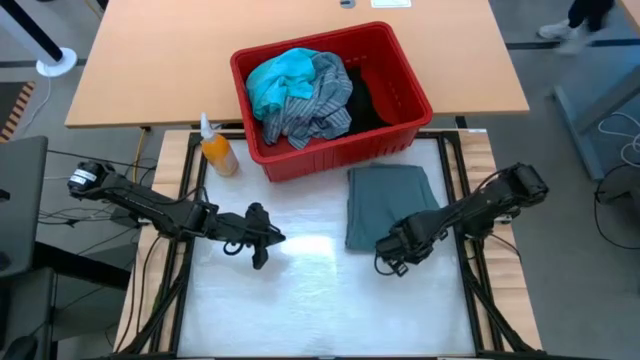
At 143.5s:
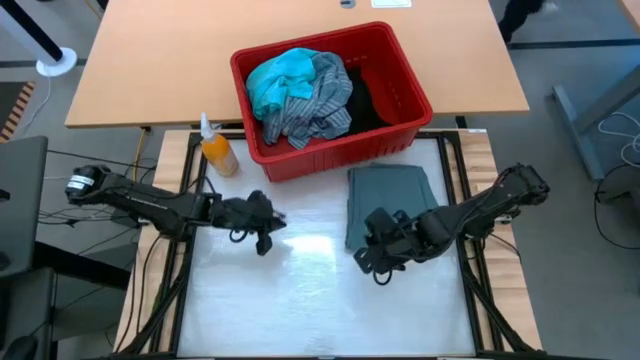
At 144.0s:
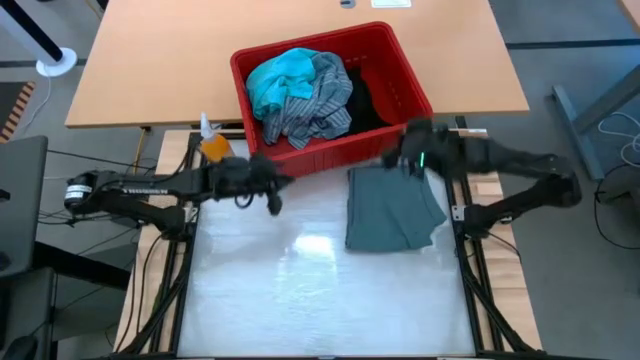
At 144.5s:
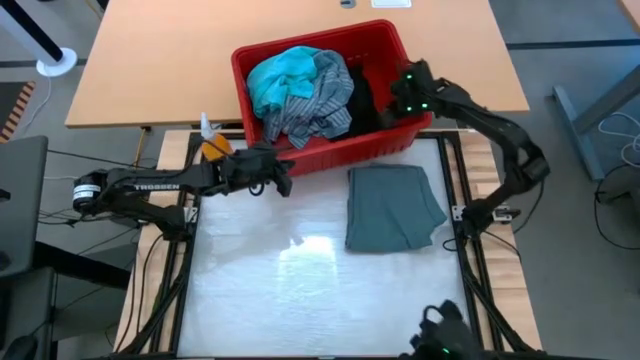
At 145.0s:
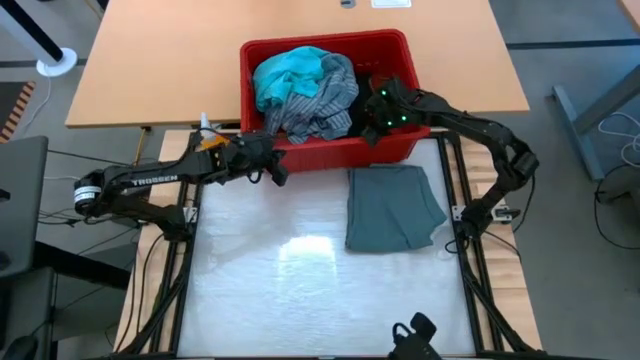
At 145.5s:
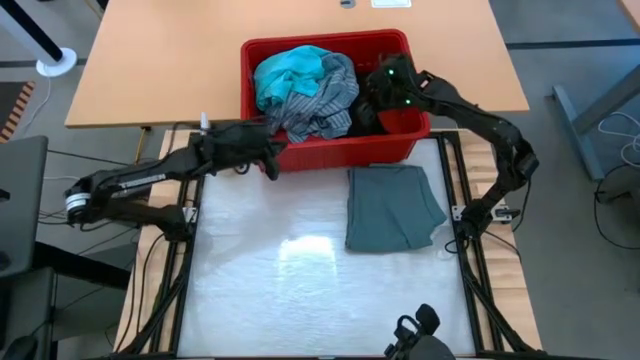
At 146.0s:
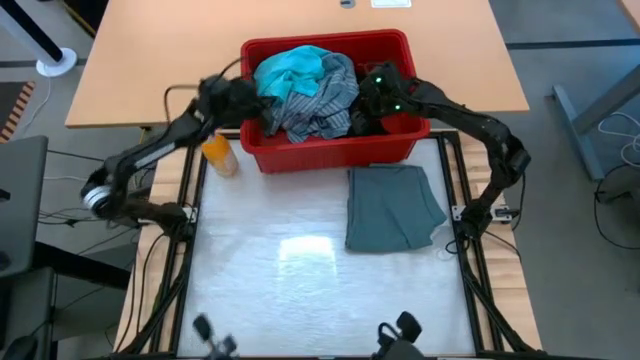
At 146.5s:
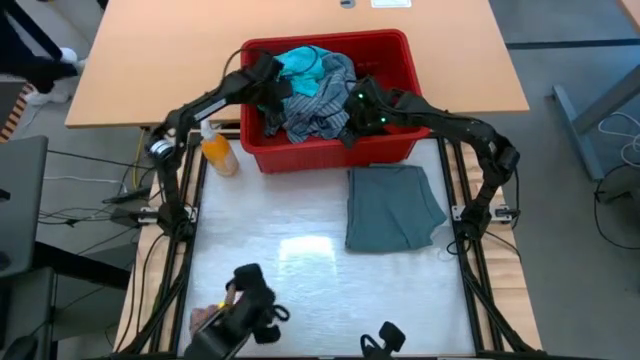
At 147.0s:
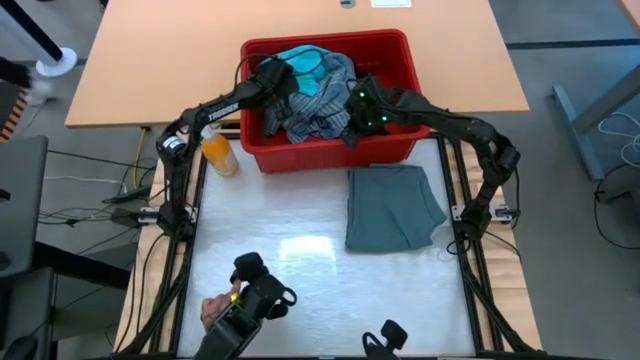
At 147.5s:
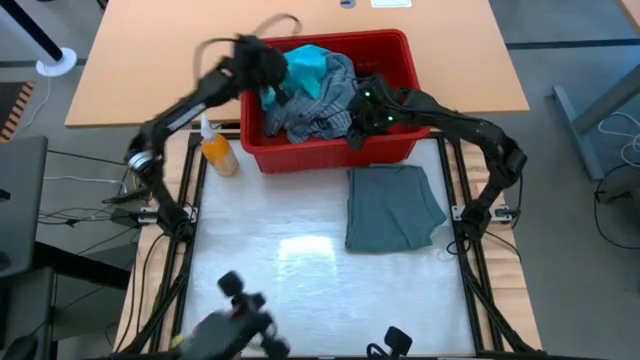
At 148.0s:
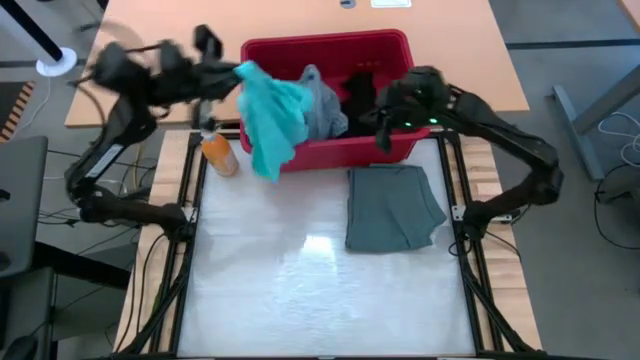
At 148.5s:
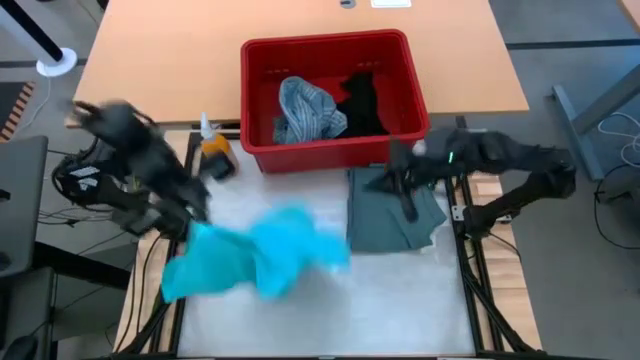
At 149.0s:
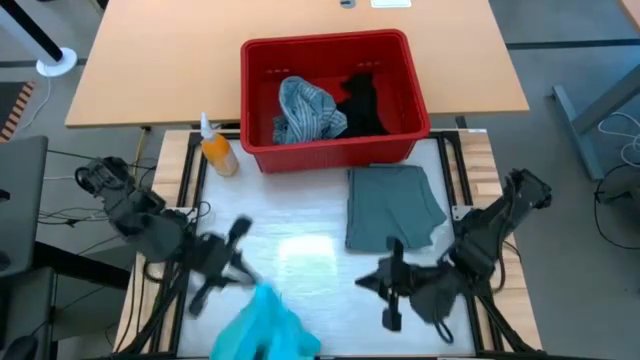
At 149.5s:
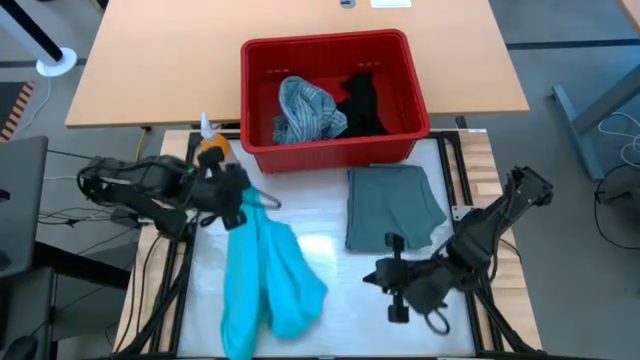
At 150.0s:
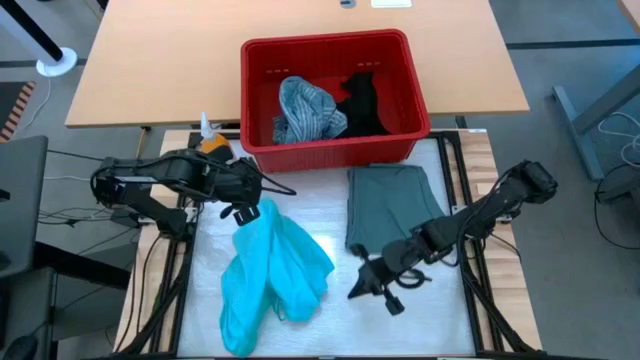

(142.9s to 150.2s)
Task: Fold Laundry from Bin
Remove the light blue shorts from the red bin

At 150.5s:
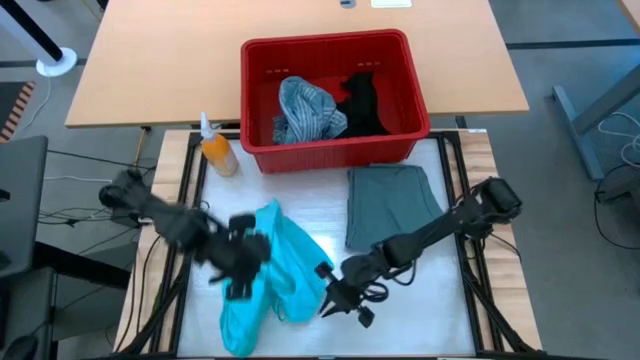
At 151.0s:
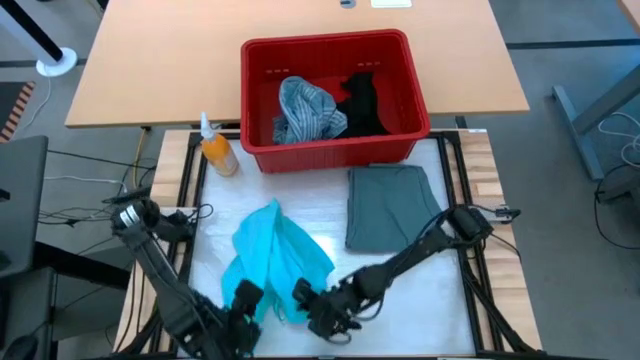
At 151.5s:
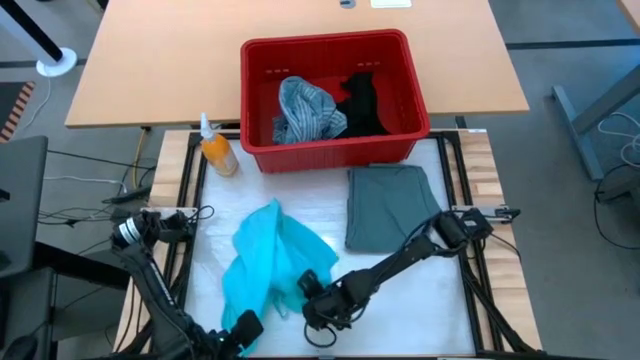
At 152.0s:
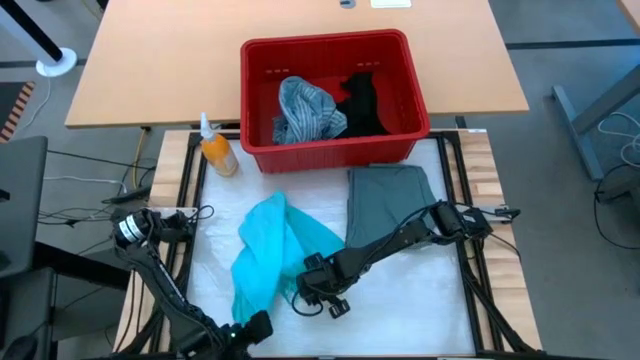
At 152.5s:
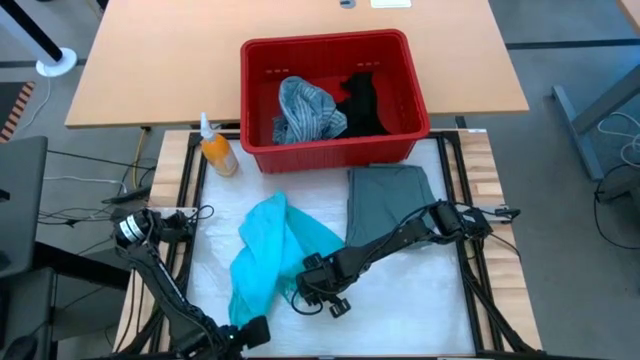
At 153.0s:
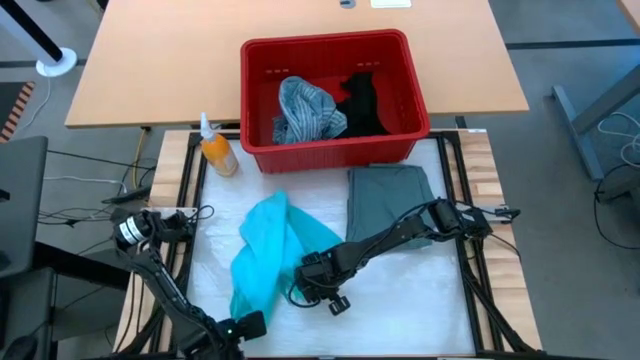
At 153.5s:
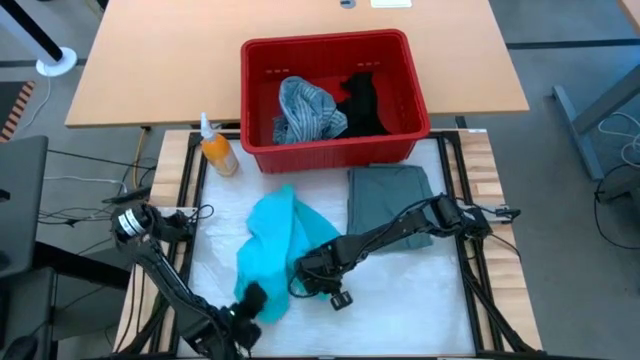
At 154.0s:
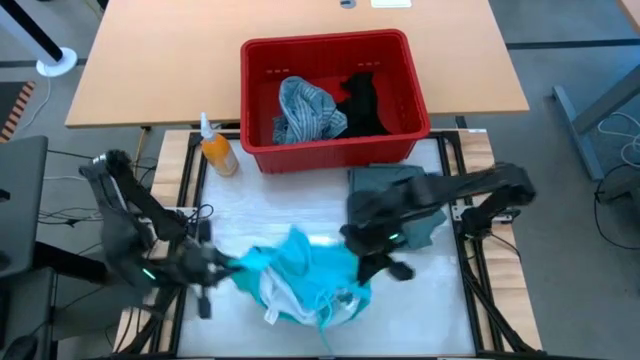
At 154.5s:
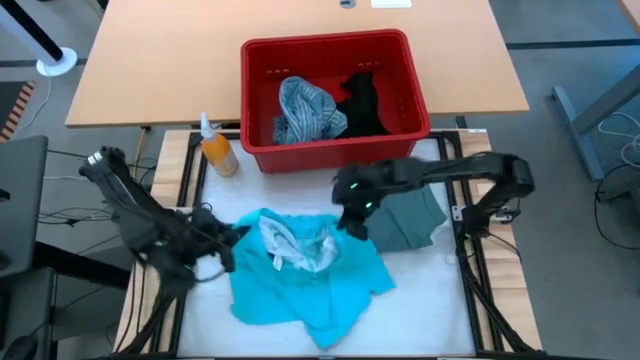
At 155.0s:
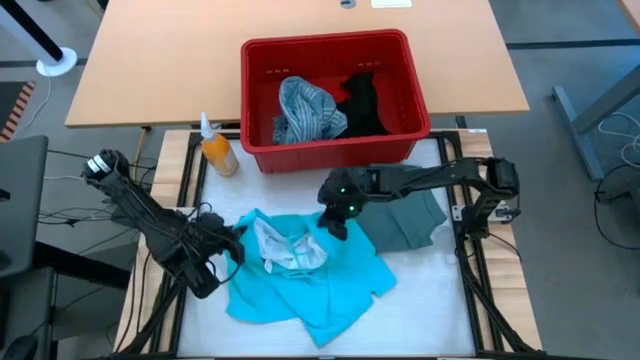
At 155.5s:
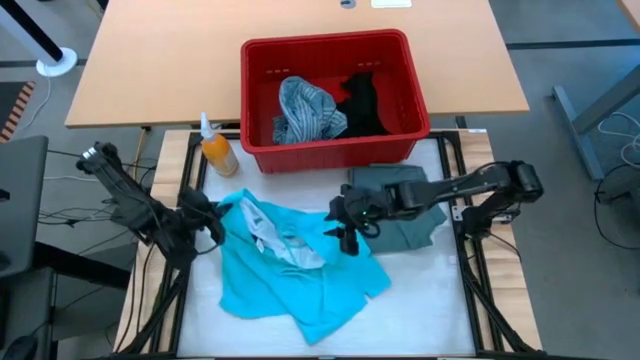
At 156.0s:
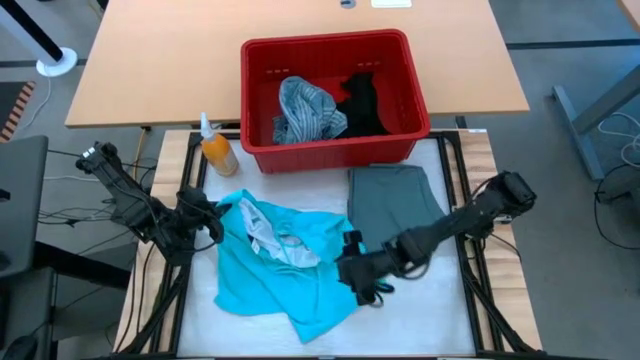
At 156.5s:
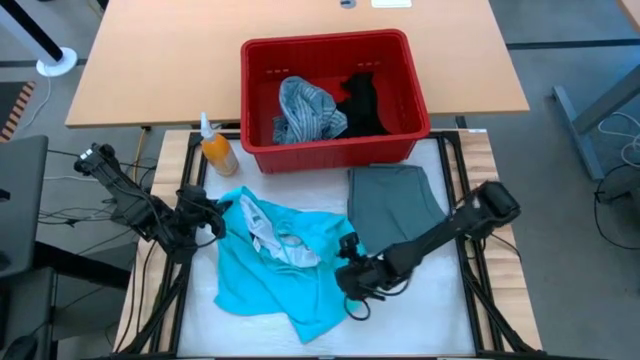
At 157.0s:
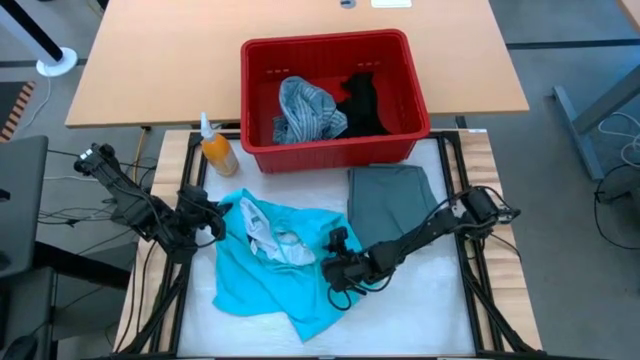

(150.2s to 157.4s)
Fold the light blue shorts

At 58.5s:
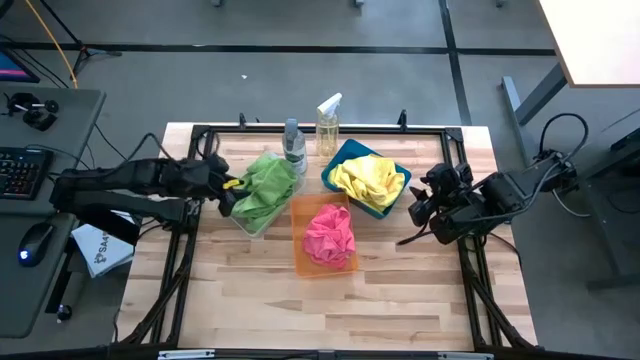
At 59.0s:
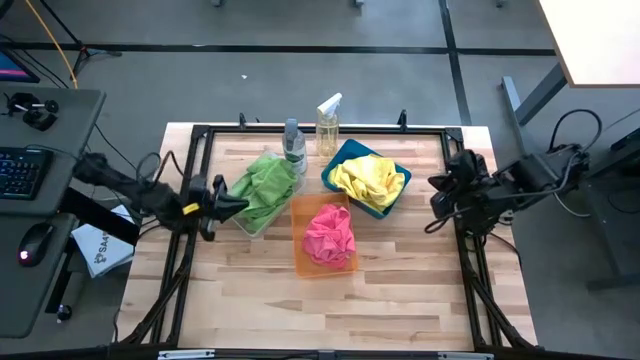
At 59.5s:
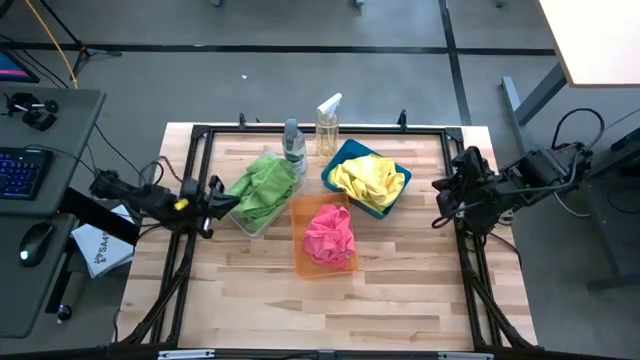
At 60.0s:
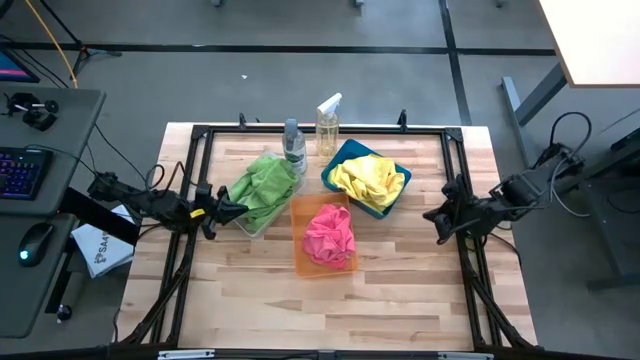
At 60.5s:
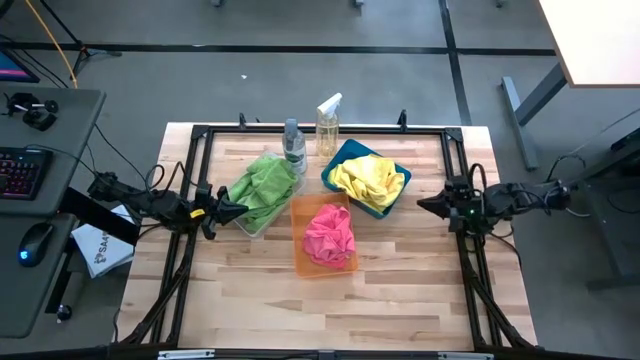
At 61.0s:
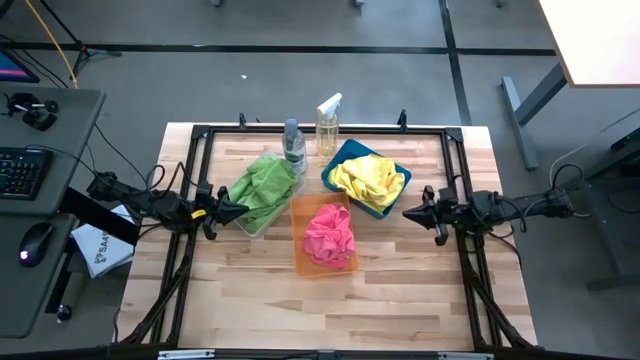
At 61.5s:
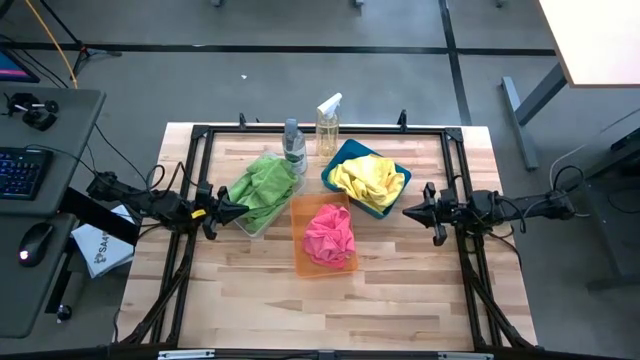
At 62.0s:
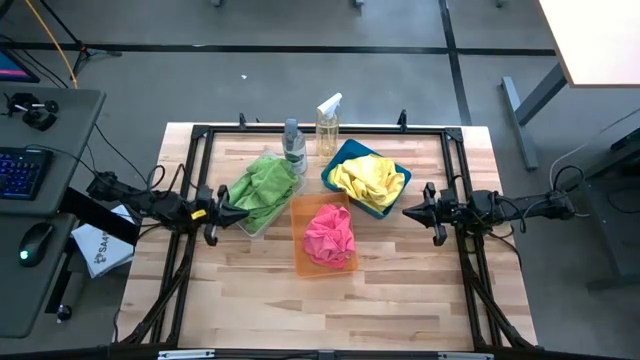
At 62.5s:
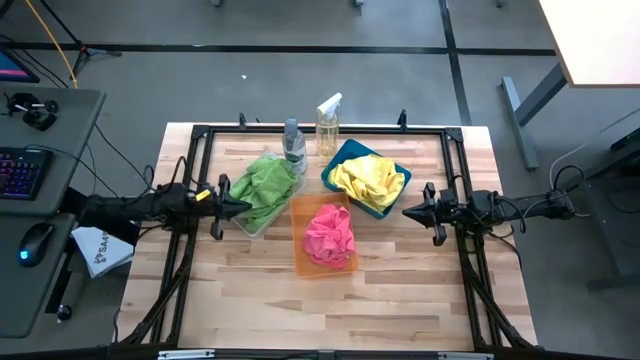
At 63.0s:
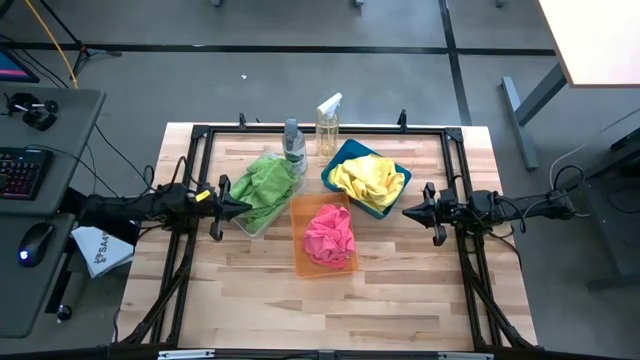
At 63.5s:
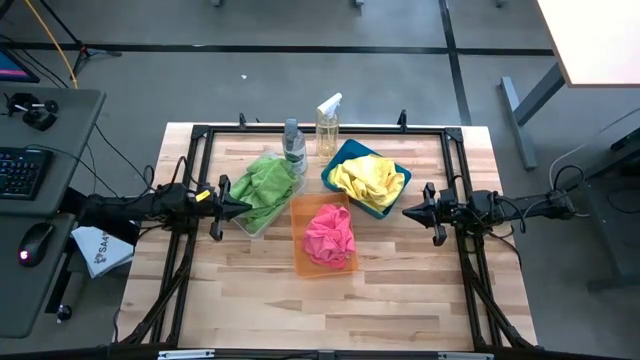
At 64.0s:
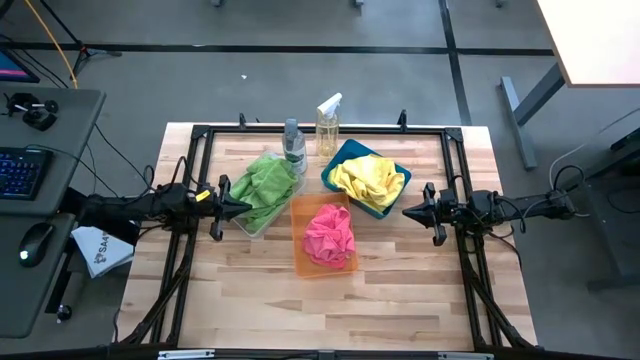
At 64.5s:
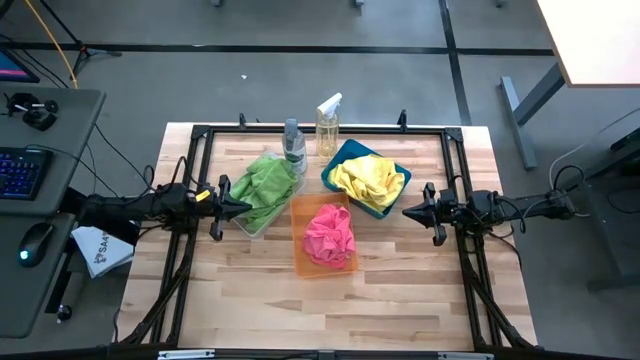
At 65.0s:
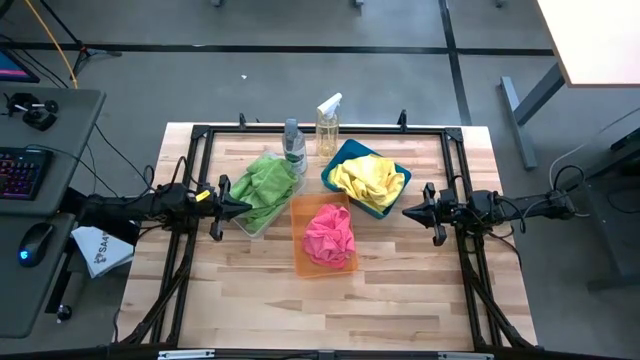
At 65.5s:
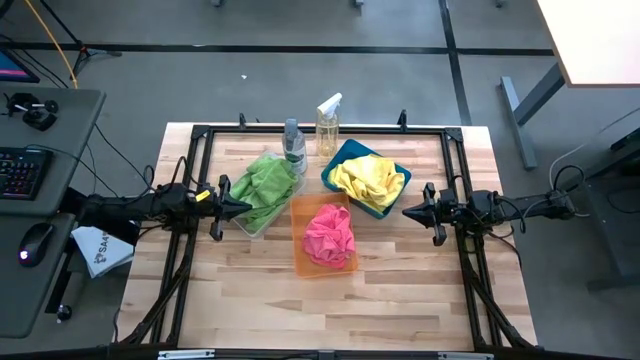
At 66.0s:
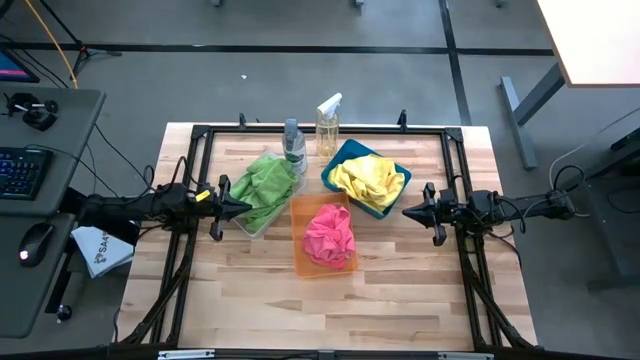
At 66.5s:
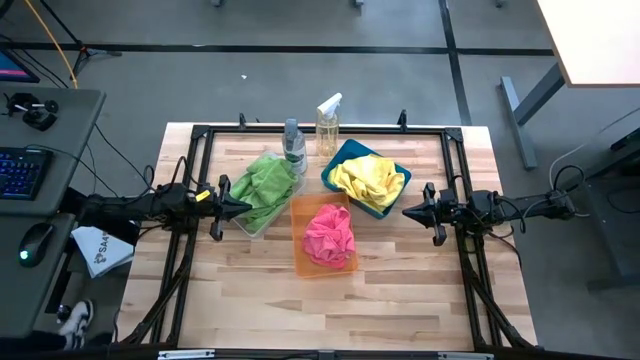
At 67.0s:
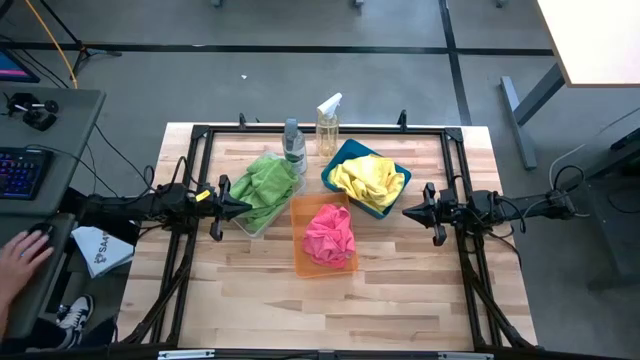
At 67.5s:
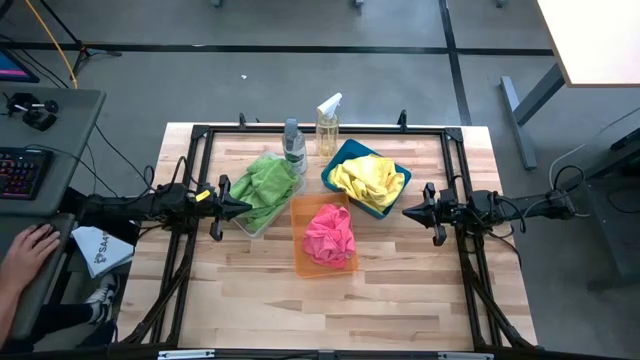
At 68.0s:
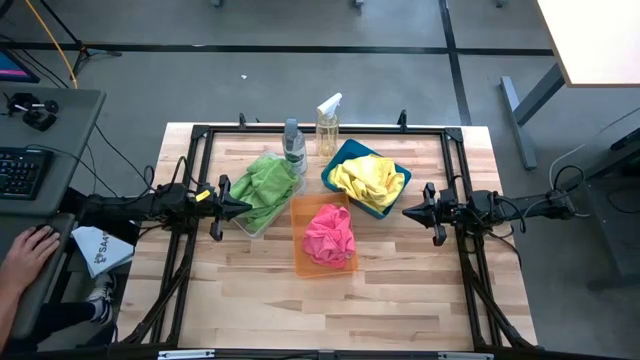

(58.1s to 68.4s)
Task: Sort microfiber towel by color & place in baskets
Return to Home Position
